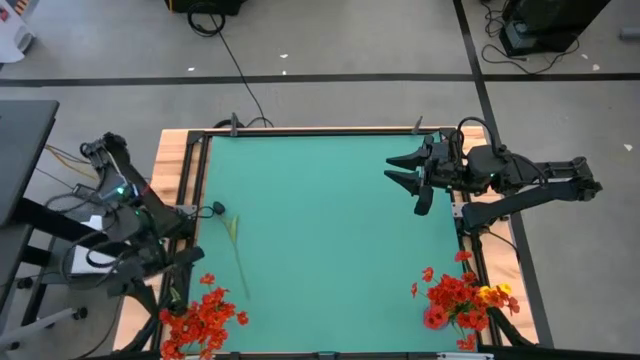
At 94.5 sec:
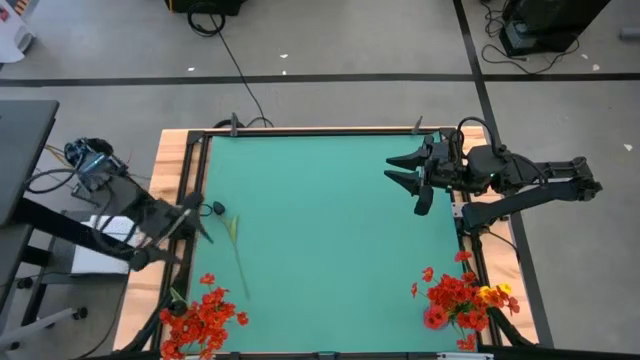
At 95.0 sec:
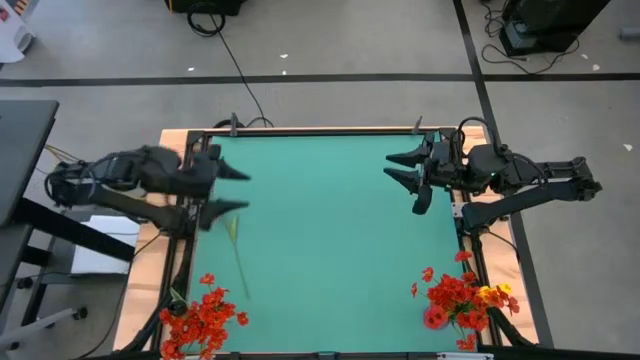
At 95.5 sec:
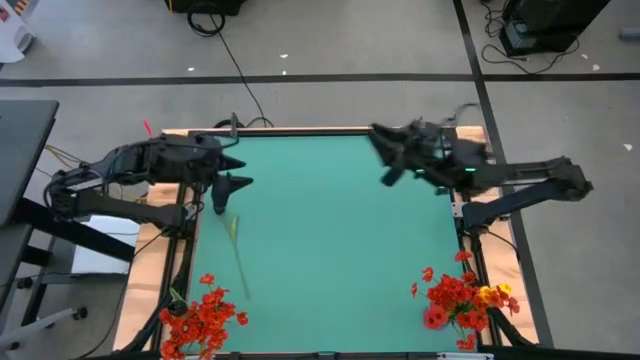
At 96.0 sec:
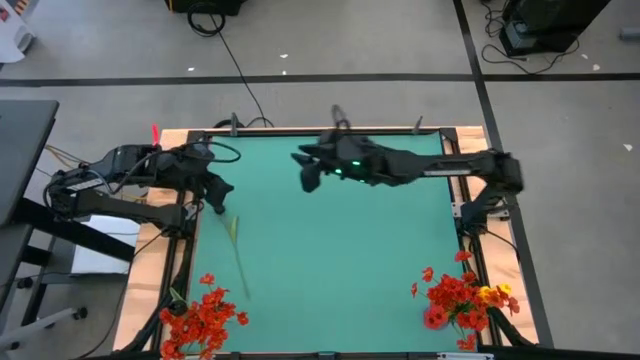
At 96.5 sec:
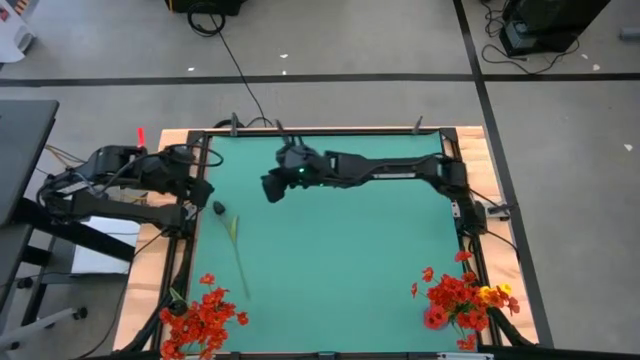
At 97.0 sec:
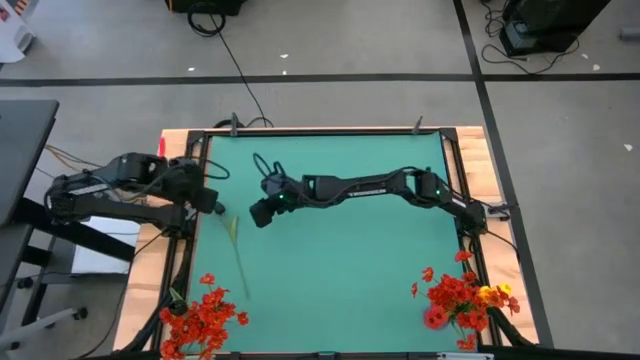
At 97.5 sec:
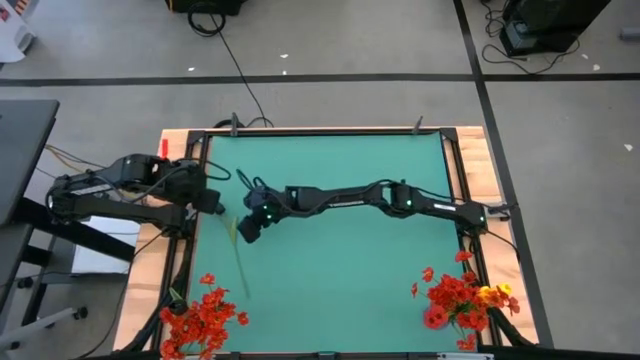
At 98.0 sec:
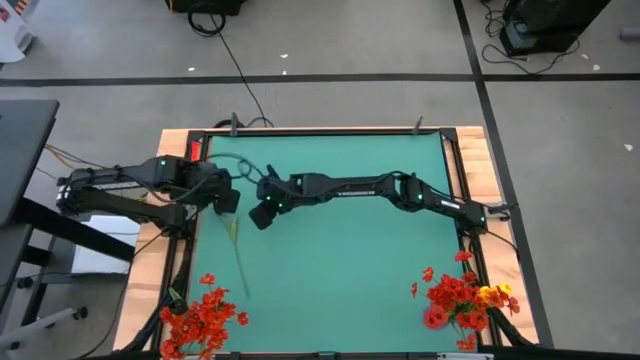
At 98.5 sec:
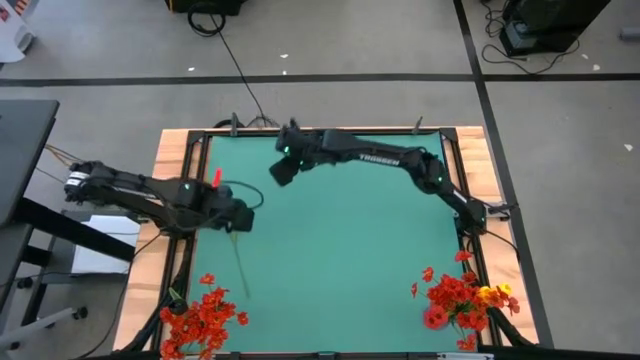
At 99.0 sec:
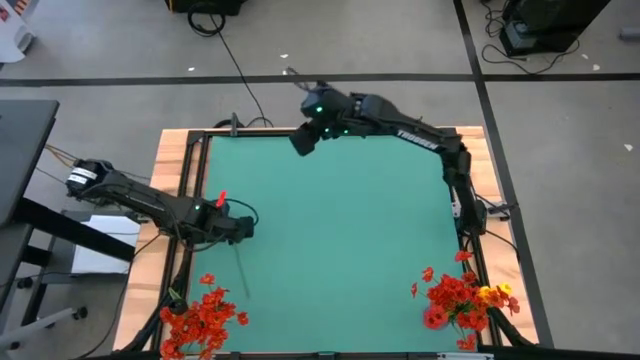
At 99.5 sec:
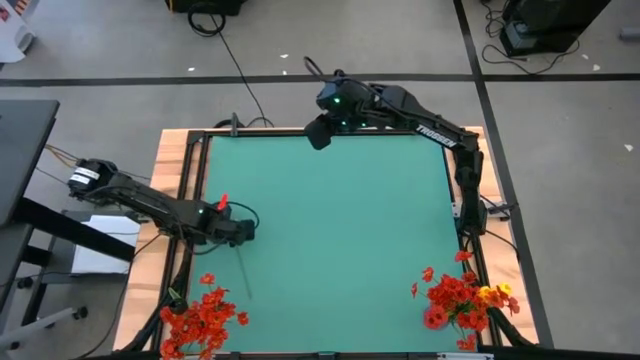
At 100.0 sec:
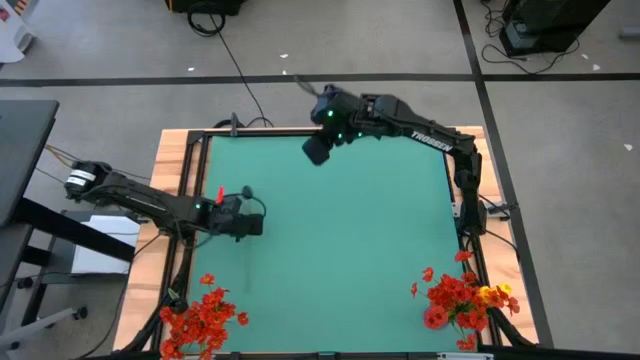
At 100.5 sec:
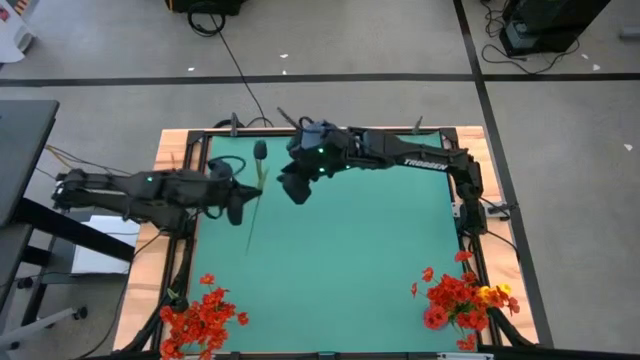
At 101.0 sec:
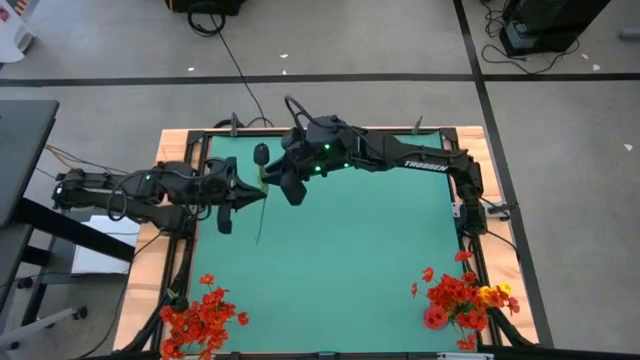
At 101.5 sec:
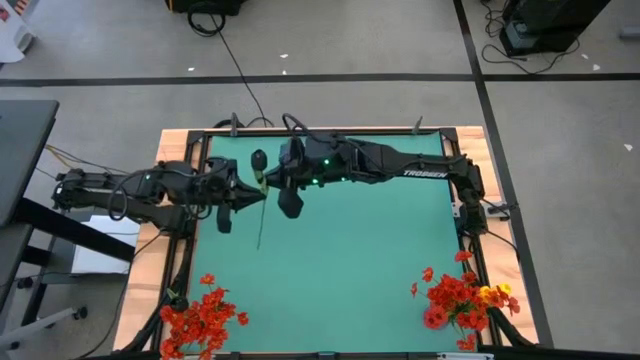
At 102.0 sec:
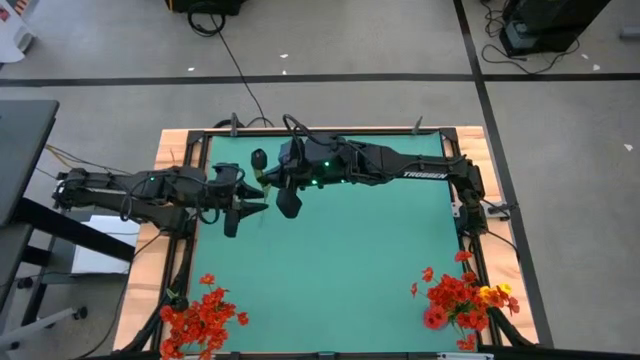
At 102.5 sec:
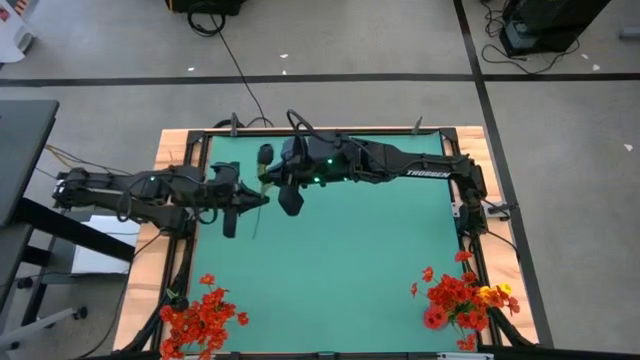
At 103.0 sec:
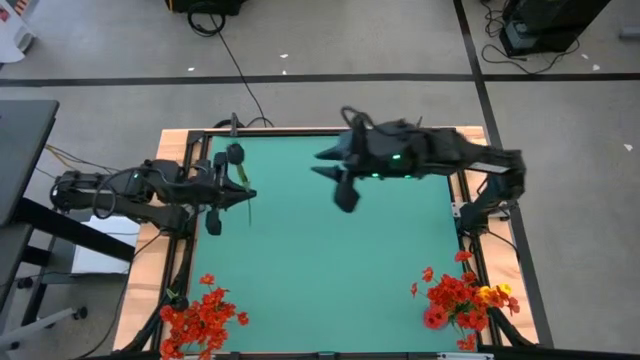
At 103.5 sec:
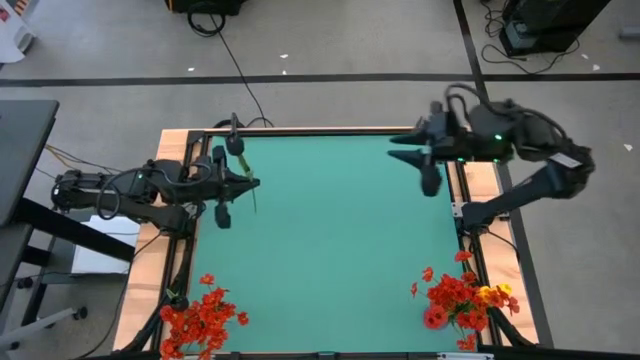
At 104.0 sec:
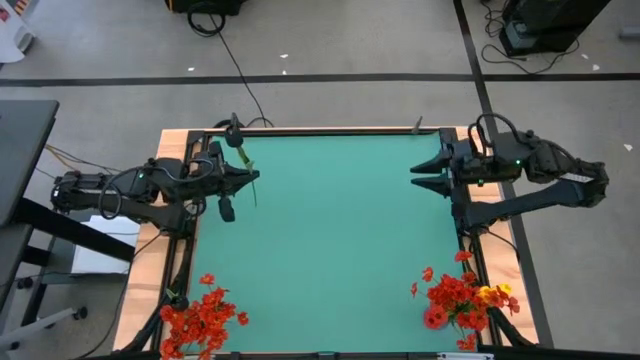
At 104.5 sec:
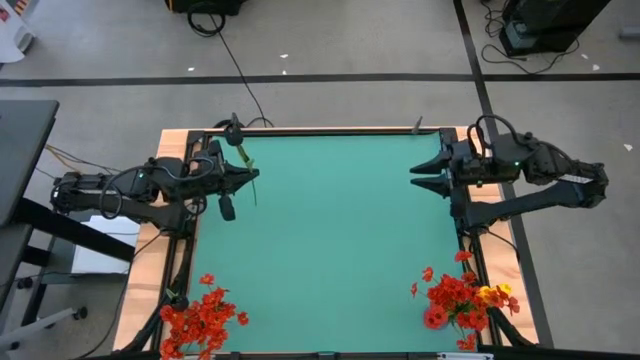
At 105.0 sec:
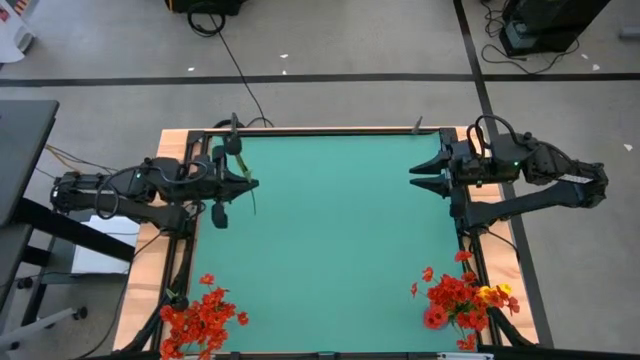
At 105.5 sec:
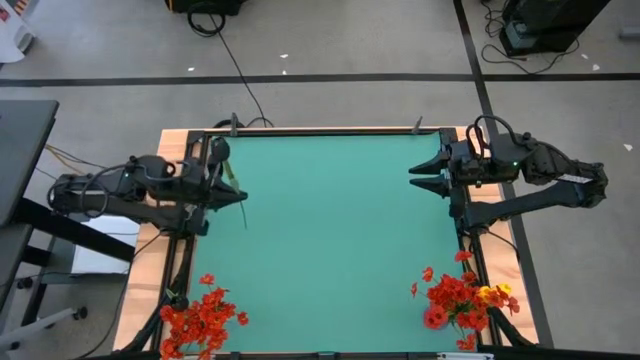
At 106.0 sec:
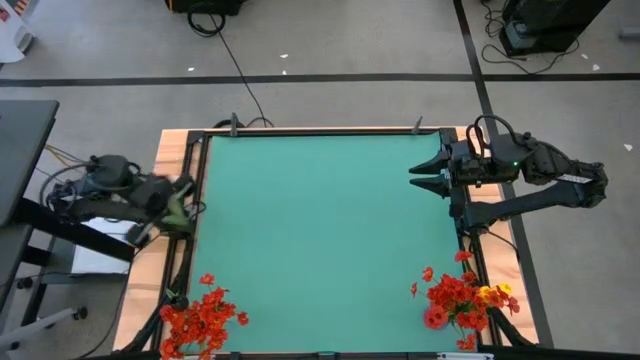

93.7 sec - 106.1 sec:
Task: Sort flowers into vase by color
Put the black tulip into the transparent vase

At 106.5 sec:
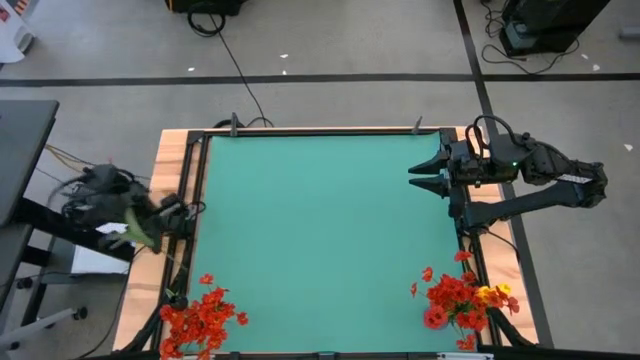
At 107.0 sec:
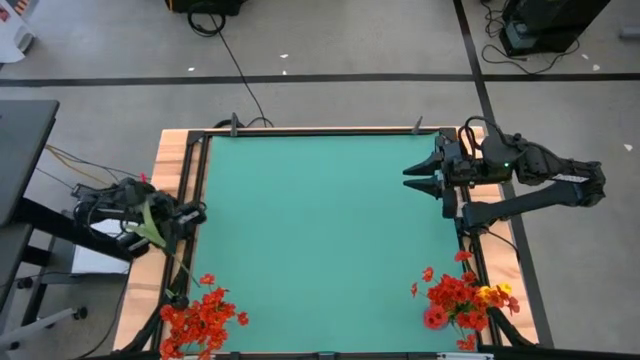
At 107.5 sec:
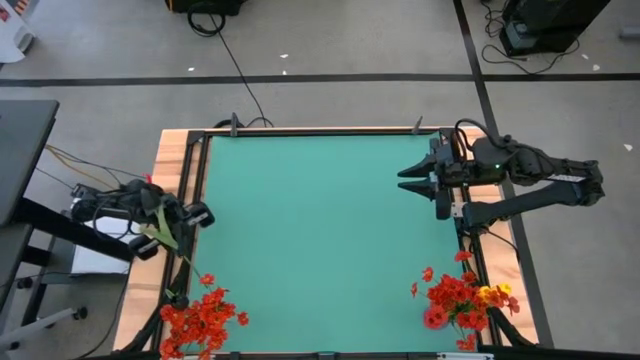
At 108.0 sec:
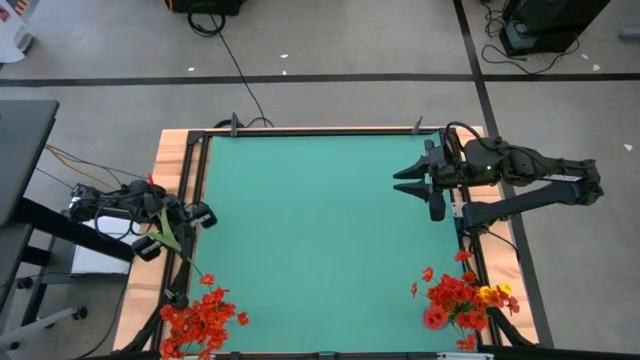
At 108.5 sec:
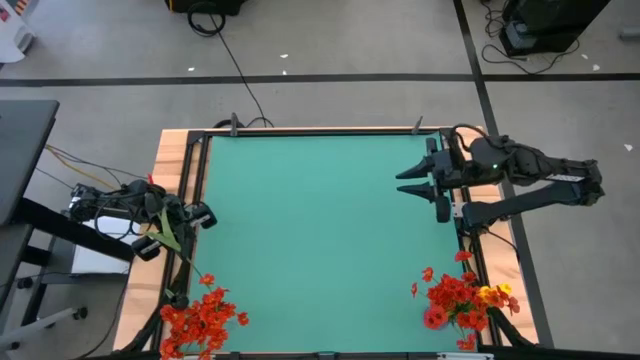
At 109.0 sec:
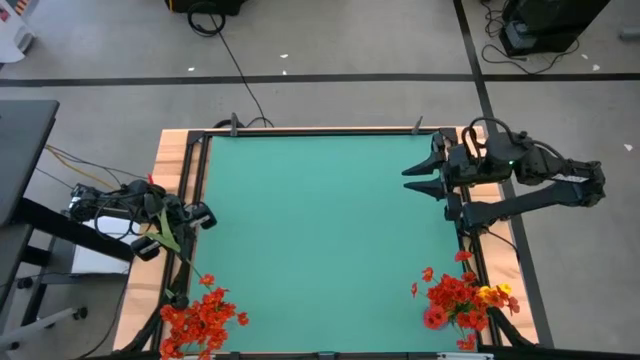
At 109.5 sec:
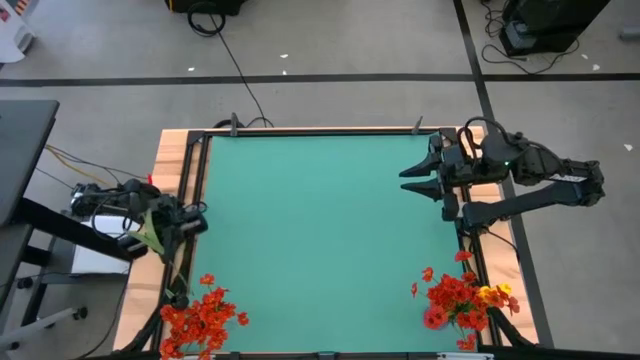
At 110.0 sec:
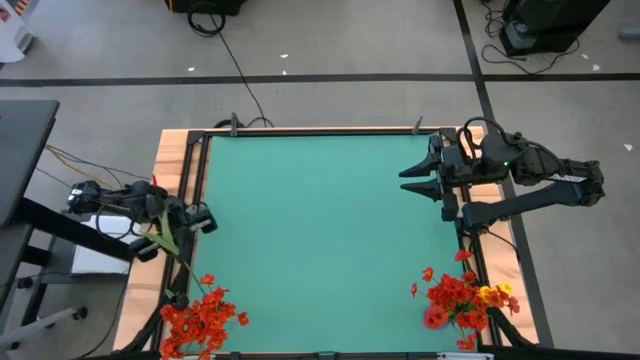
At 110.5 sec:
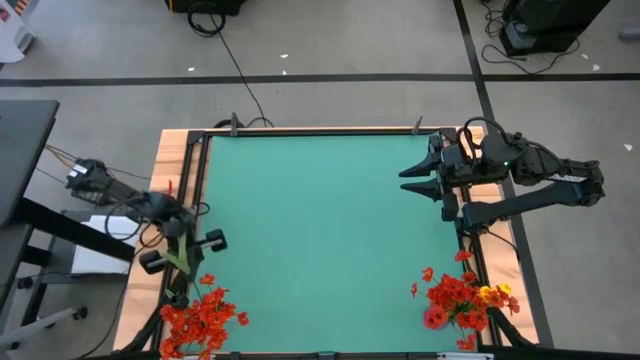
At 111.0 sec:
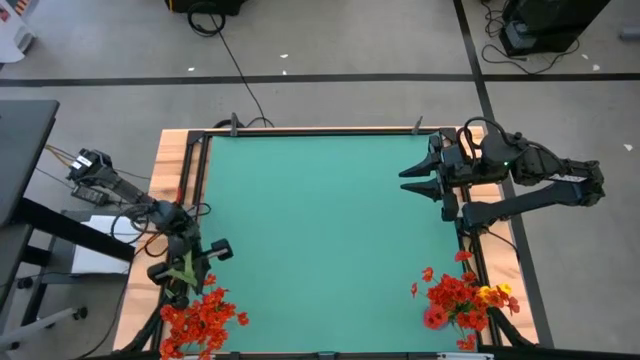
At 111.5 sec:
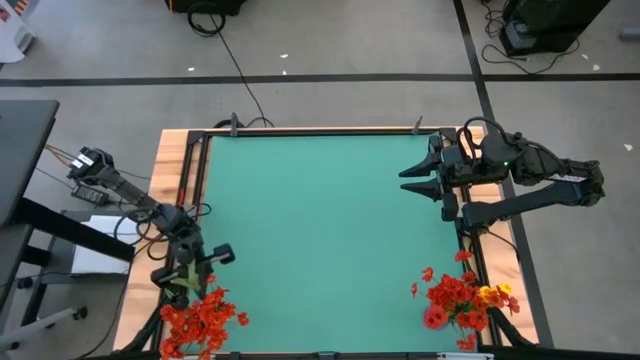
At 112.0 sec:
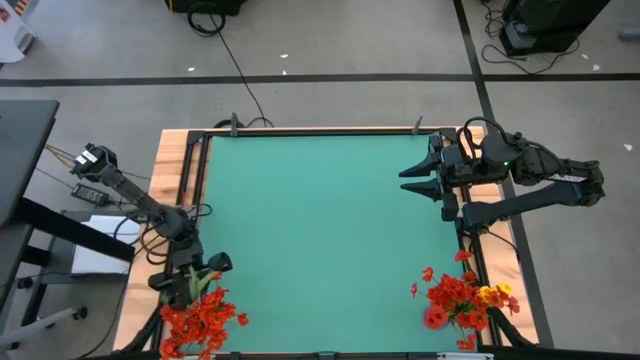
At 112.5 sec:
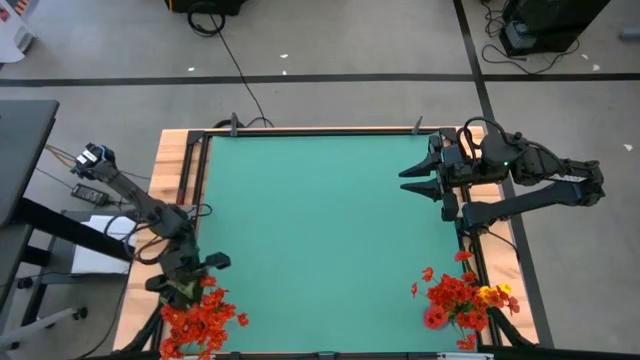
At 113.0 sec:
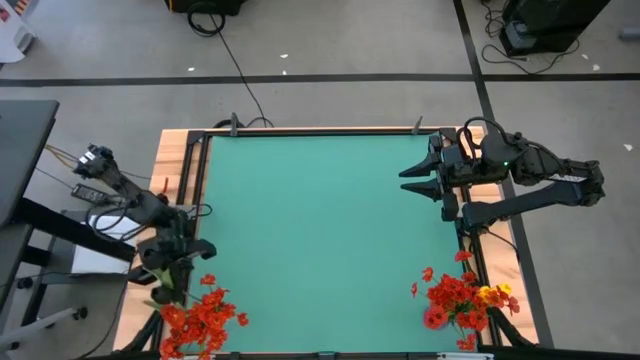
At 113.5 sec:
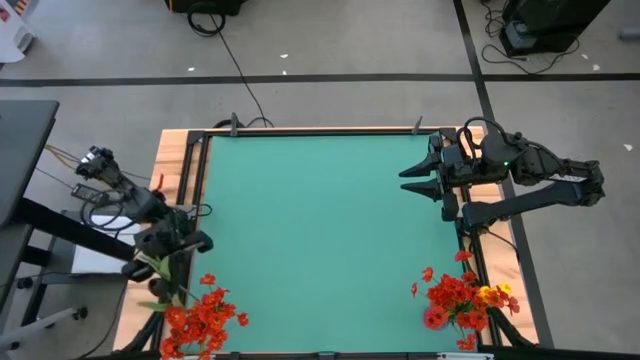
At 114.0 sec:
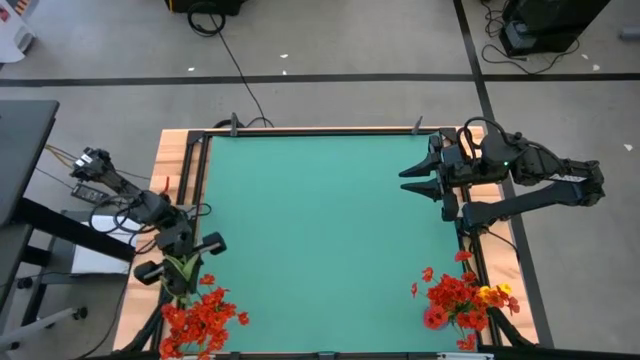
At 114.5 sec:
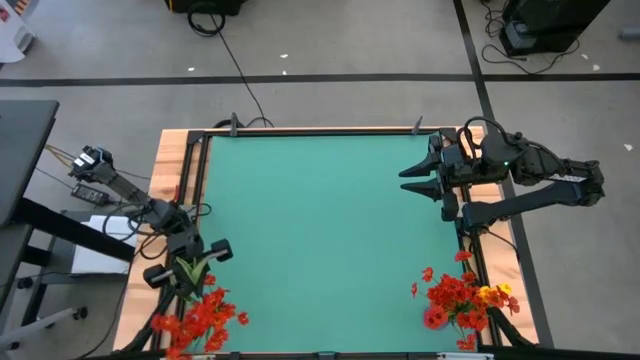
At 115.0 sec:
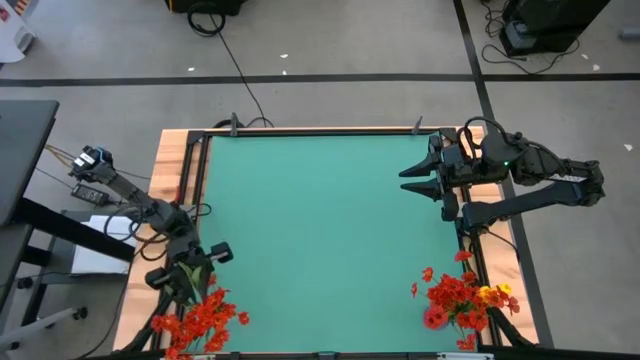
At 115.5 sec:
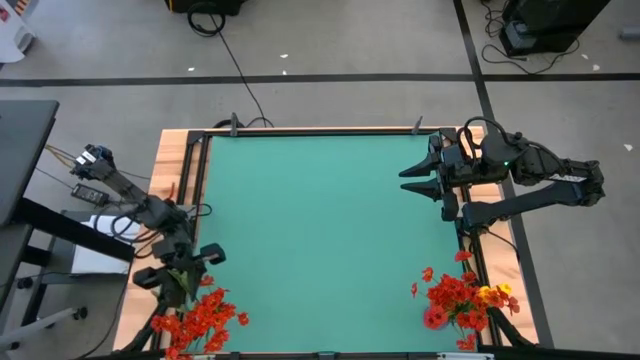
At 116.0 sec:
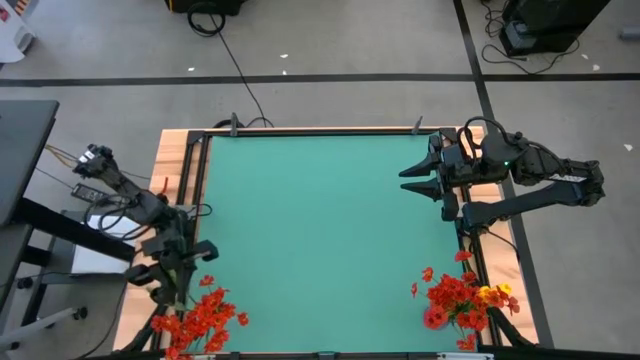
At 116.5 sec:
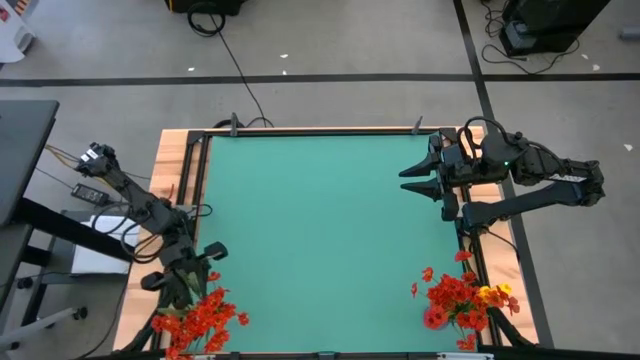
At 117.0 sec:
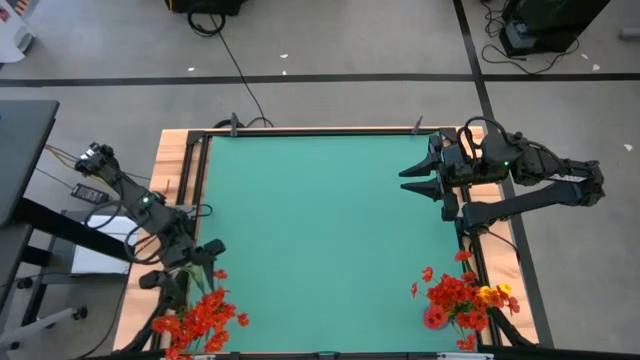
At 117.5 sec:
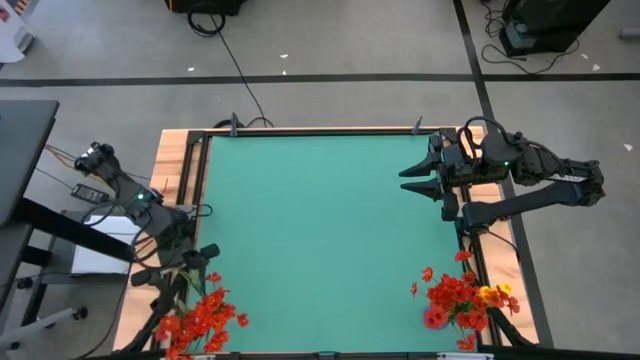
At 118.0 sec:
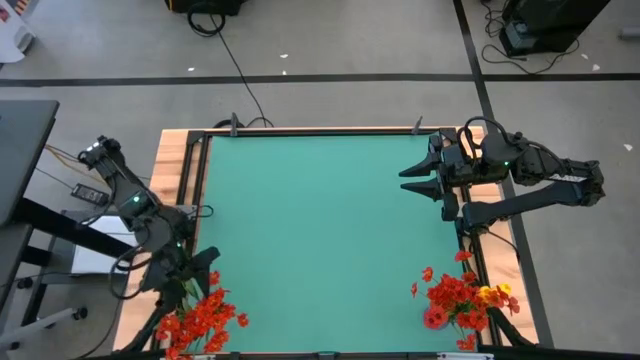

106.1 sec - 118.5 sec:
Put the black tulip into the transparent vase
